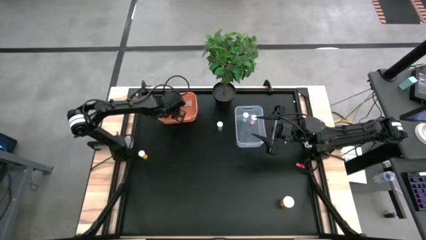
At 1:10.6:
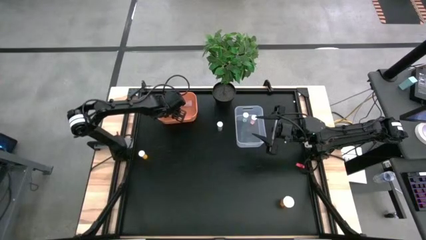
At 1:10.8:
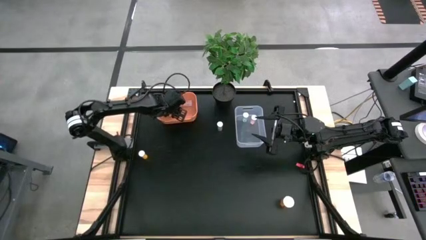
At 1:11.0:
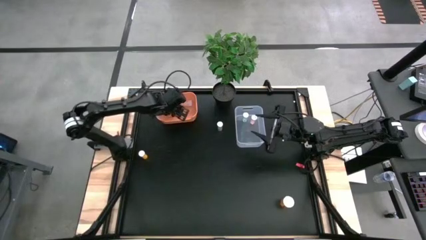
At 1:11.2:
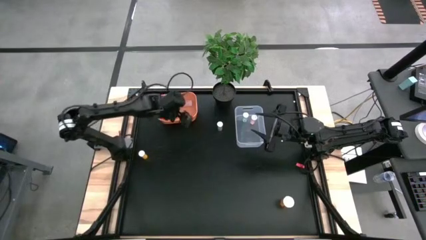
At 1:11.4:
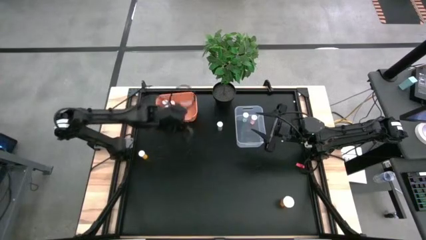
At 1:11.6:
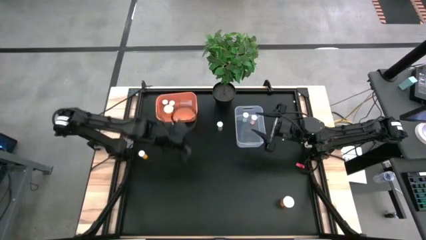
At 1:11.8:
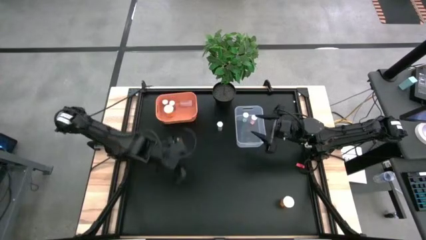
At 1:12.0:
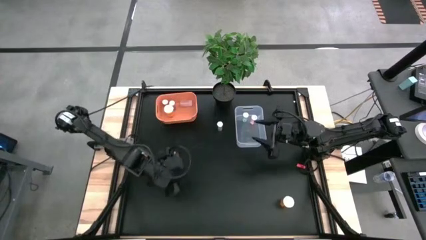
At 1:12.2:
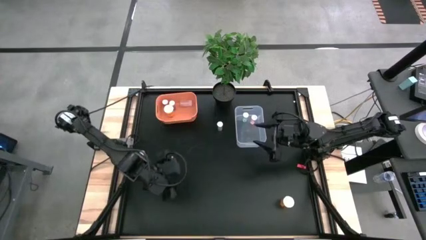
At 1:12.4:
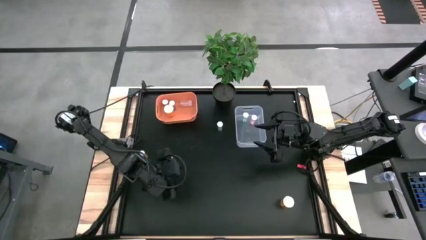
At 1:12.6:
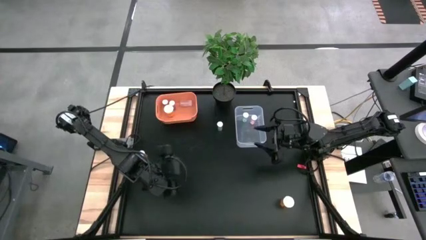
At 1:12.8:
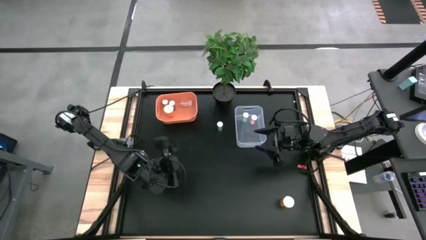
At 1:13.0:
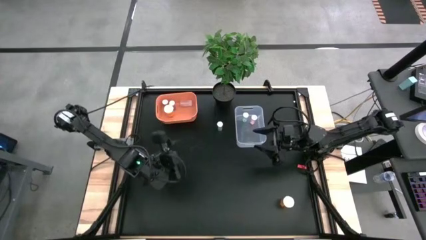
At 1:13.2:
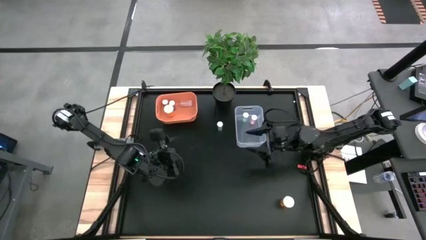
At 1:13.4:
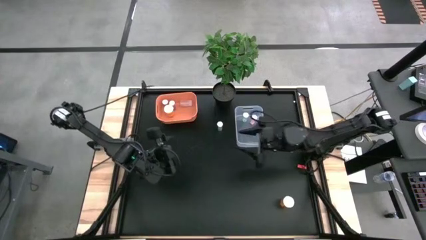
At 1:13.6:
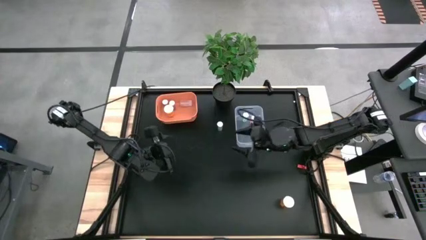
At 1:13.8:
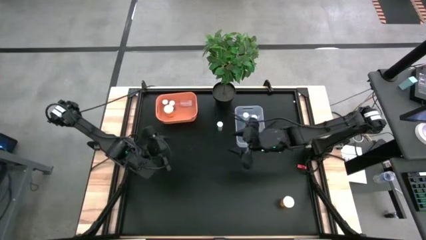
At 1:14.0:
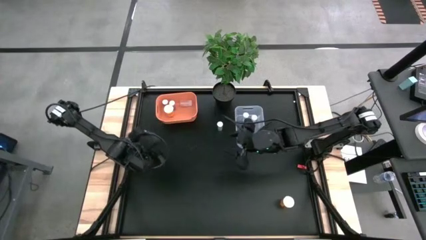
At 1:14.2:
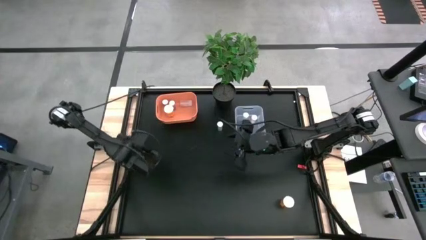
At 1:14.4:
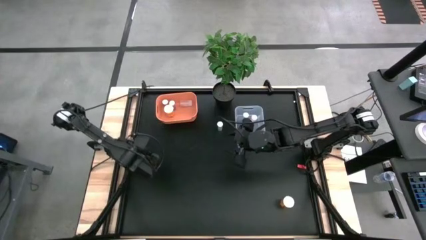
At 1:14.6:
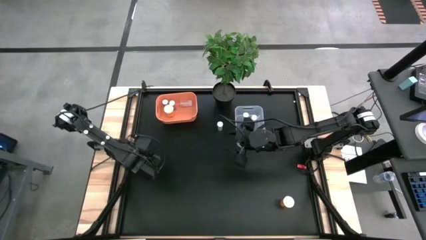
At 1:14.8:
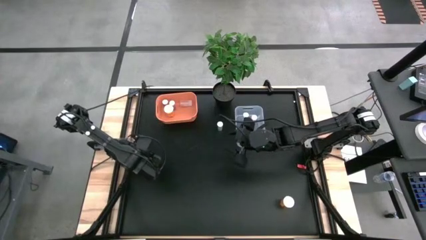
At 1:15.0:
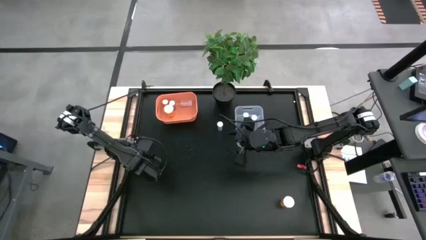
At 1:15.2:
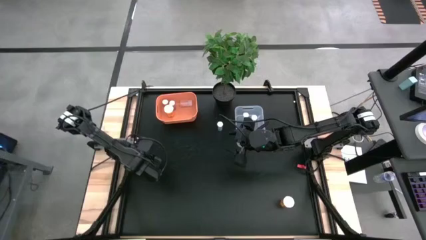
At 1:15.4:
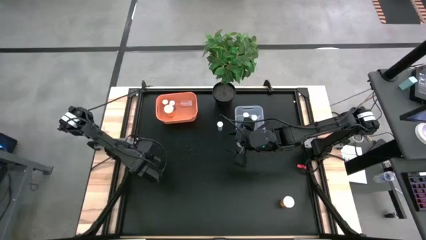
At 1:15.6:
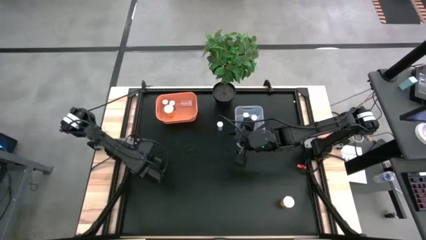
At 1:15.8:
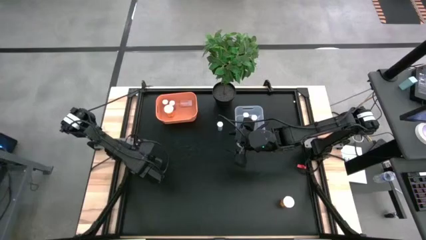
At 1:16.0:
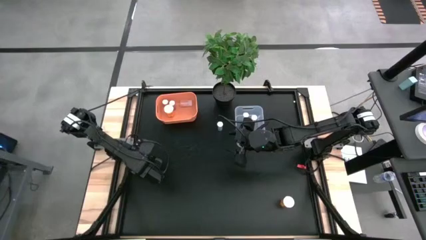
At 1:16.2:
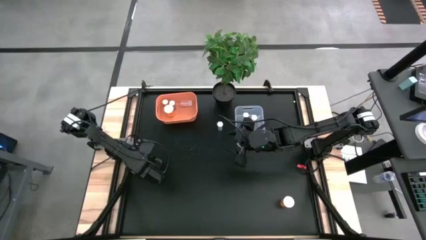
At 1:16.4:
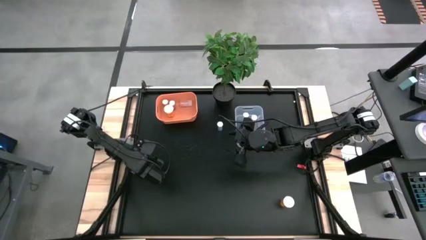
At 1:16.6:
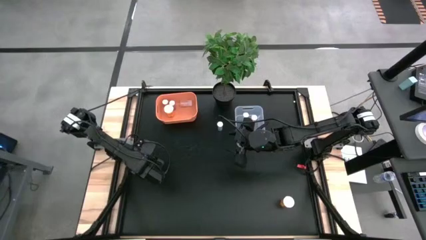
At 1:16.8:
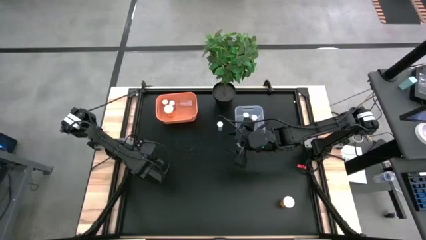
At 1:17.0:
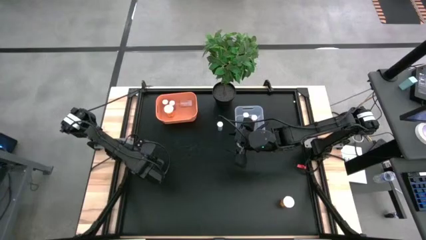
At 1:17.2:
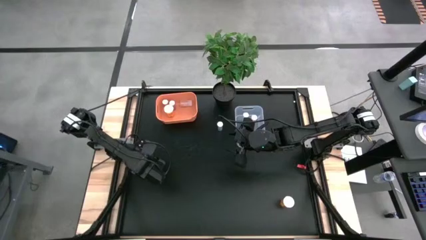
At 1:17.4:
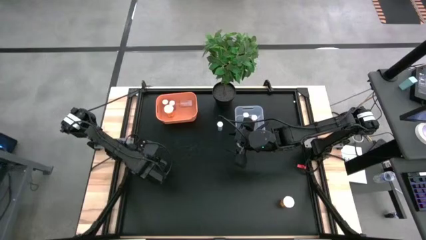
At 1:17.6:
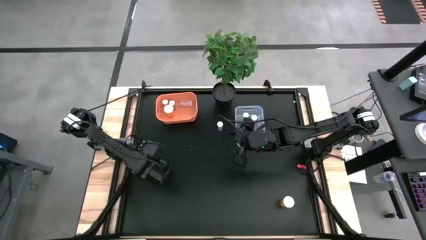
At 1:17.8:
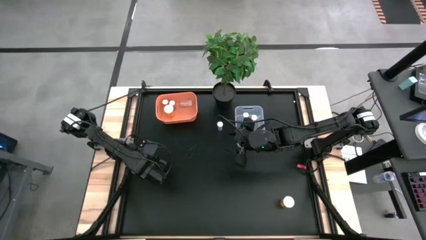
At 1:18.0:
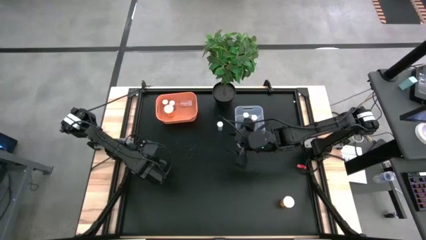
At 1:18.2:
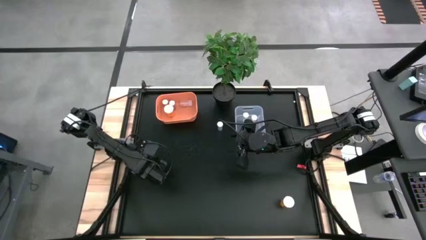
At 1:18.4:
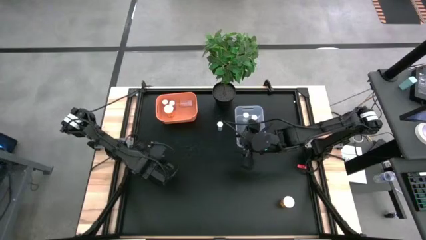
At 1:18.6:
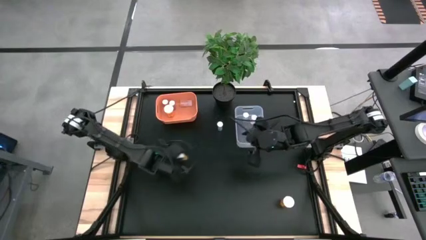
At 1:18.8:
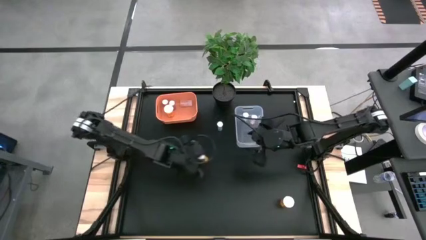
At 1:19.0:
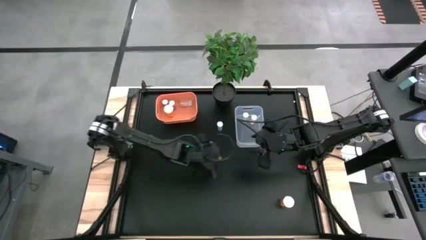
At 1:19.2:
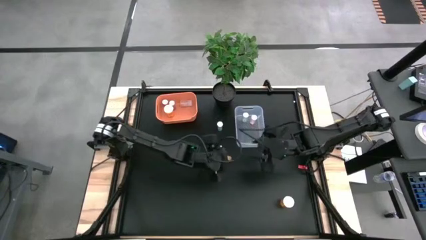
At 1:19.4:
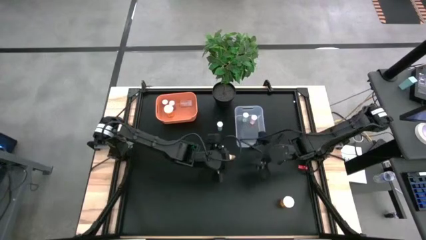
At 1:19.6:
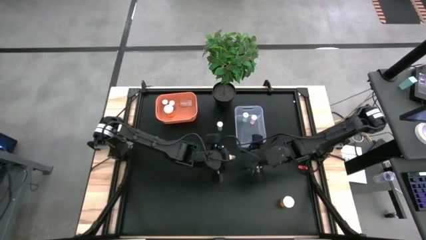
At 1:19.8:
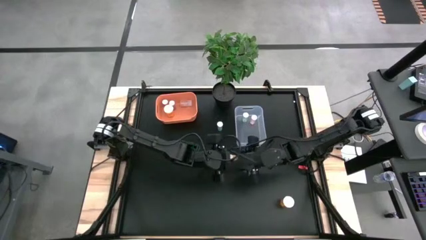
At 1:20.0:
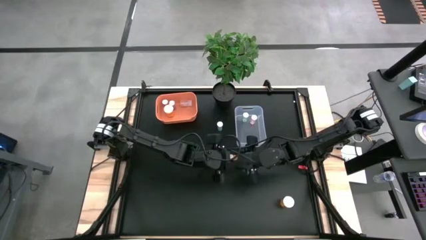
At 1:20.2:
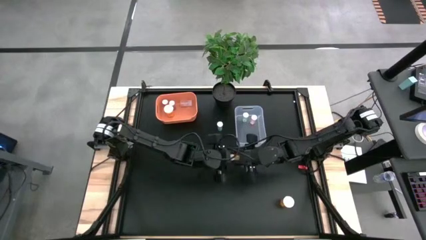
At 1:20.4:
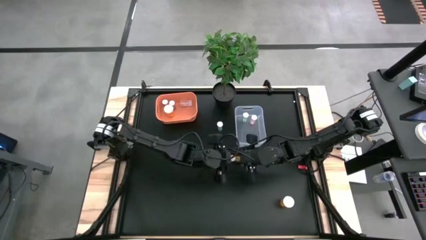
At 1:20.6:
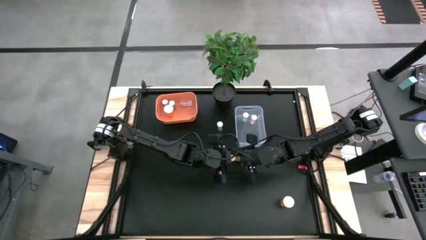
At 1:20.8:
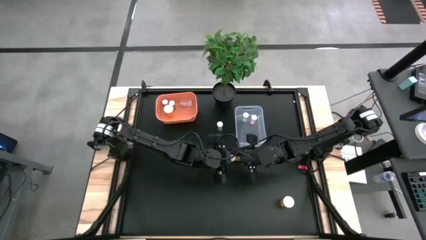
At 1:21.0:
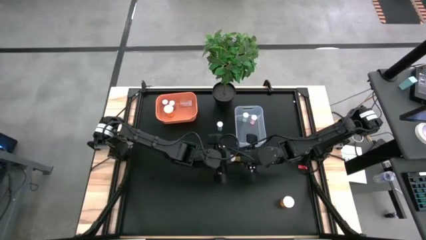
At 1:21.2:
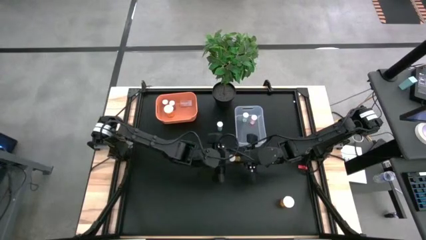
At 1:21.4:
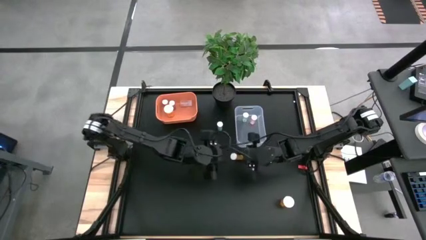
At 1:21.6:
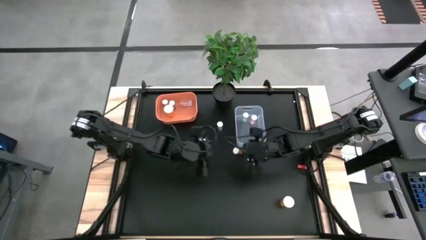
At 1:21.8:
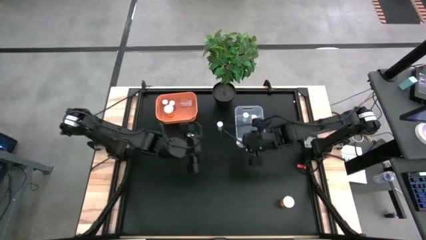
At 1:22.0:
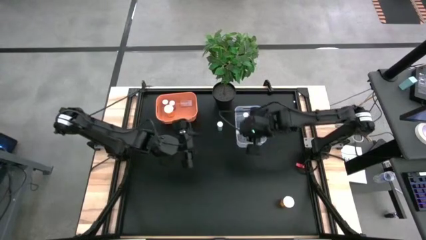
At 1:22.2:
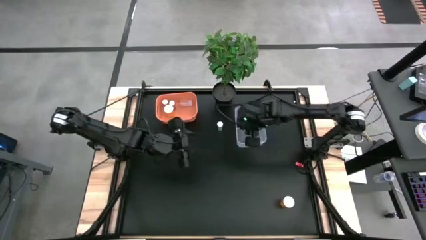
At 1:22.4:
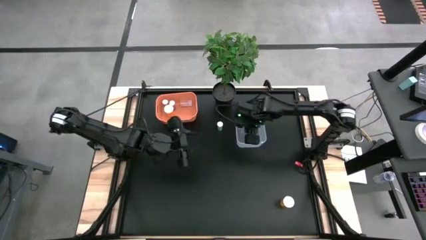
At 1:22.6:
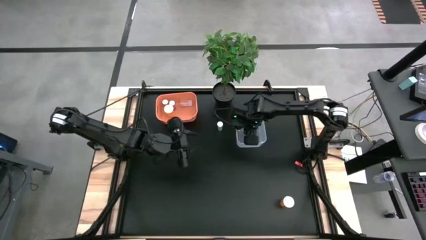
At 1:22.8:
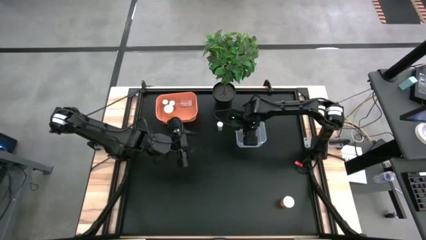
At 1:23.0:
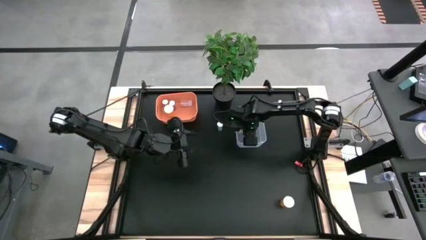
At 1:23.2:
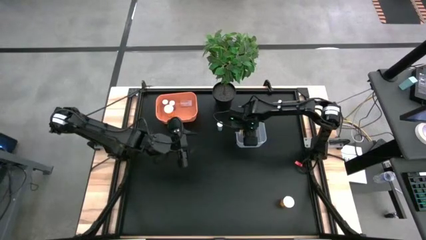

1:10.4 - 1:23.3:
Task: Pick and place medicine bottles into bin by pill shape (circle, oval)
Put the orange capsule pill bottle into the transparent bin
